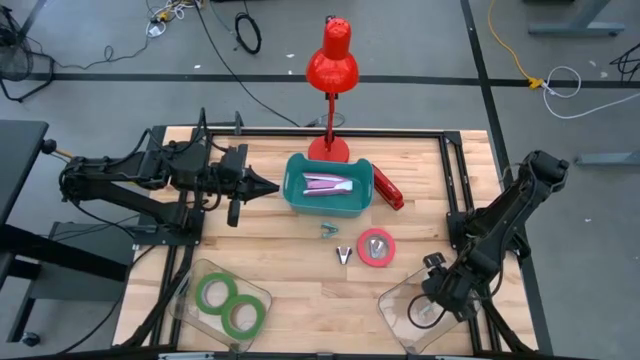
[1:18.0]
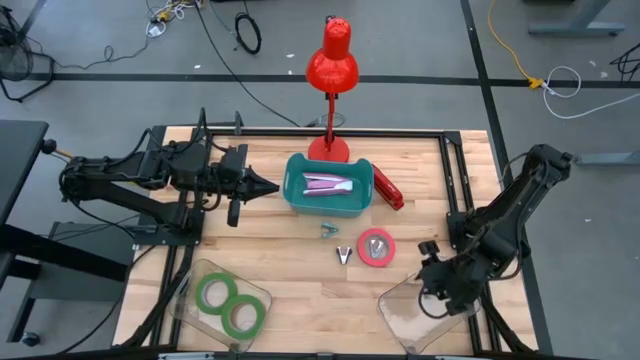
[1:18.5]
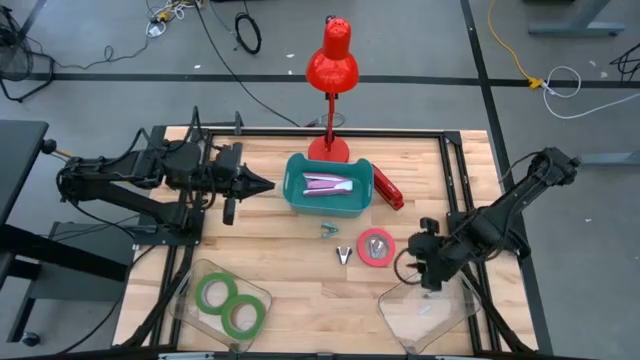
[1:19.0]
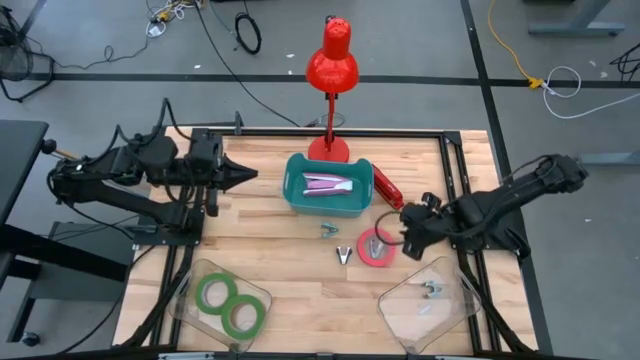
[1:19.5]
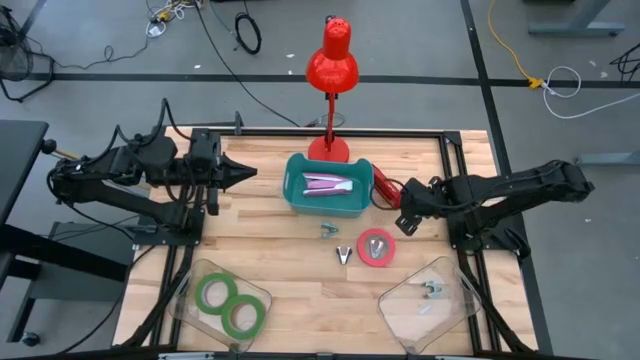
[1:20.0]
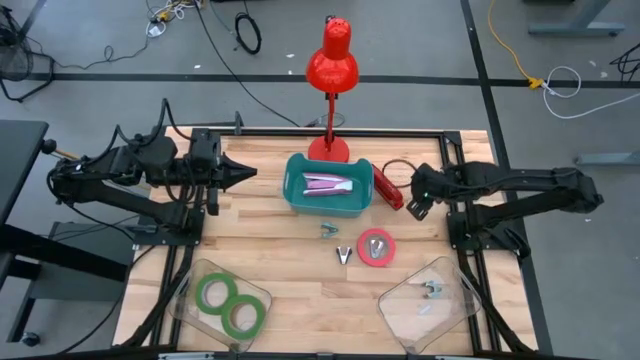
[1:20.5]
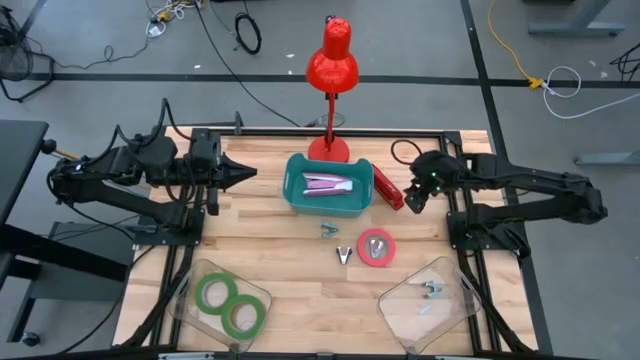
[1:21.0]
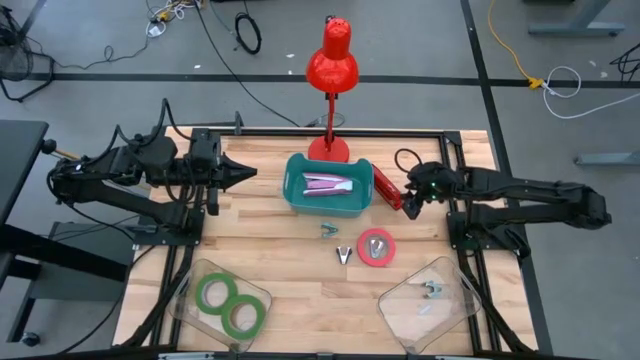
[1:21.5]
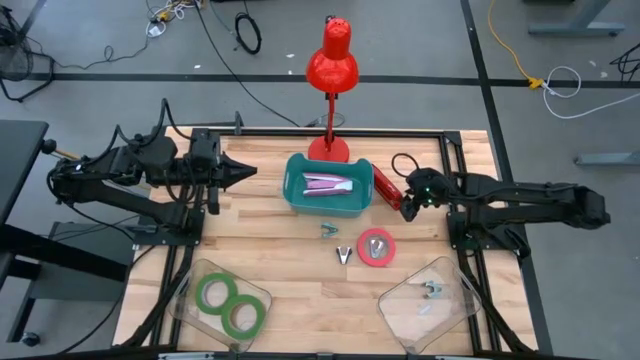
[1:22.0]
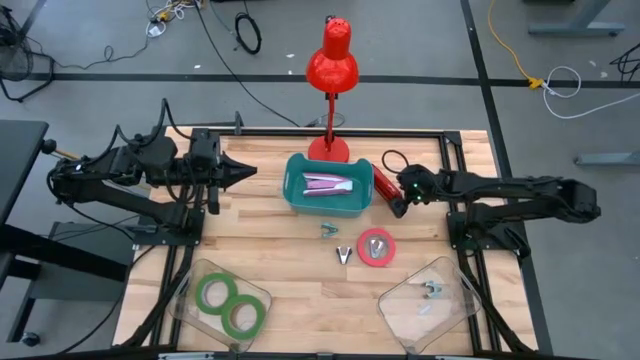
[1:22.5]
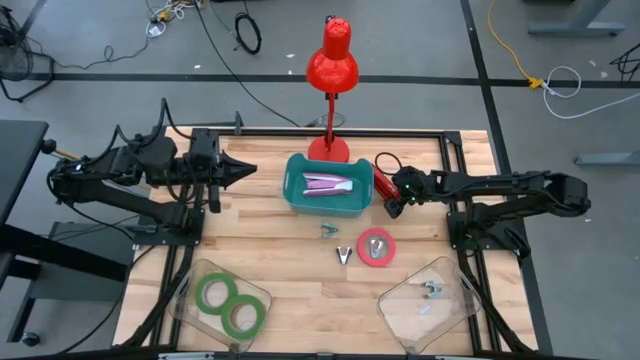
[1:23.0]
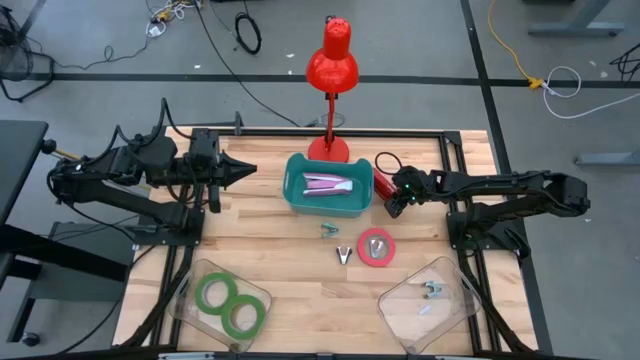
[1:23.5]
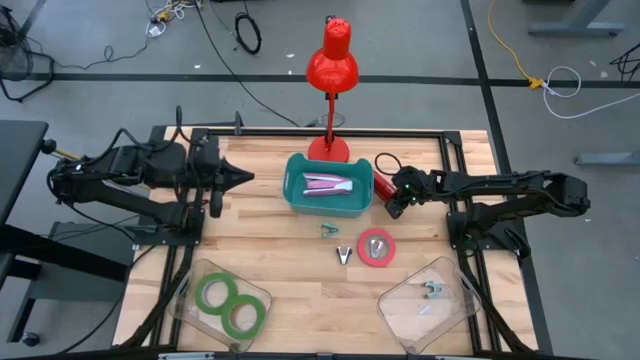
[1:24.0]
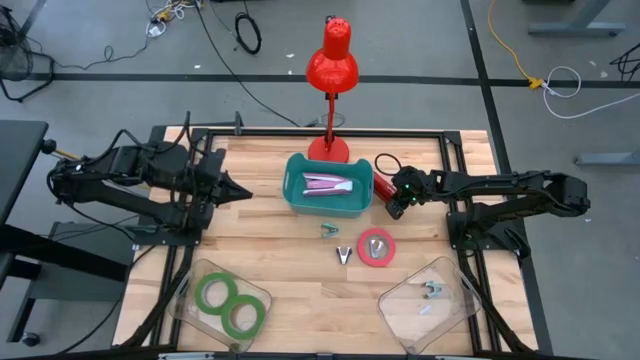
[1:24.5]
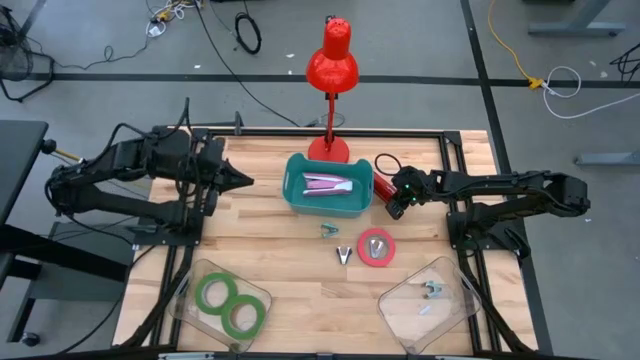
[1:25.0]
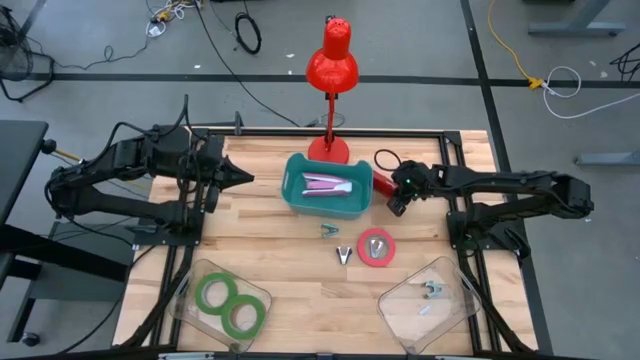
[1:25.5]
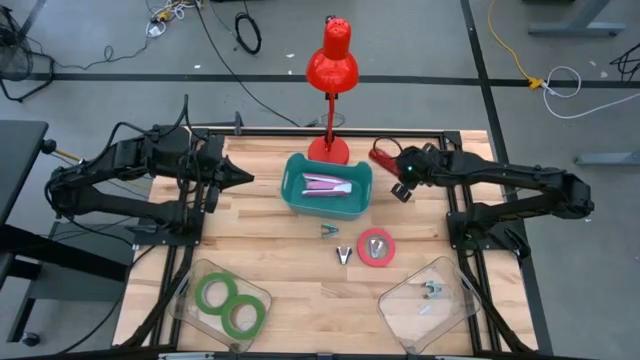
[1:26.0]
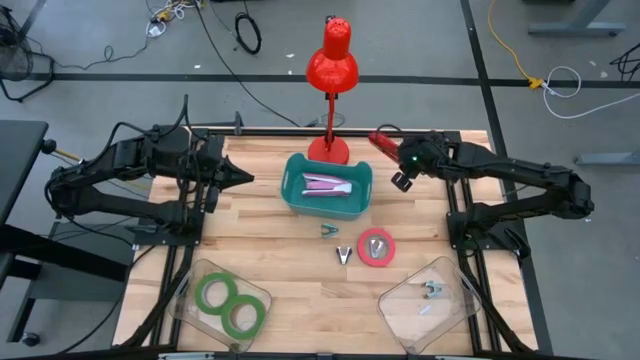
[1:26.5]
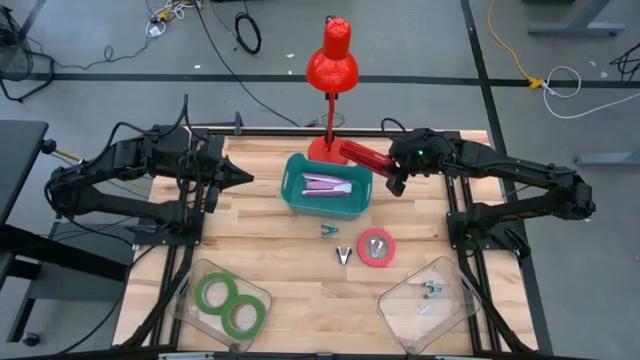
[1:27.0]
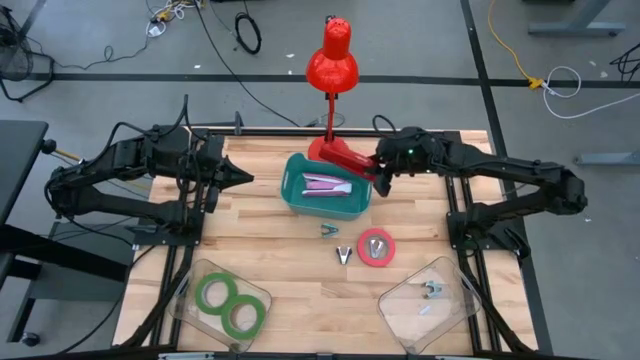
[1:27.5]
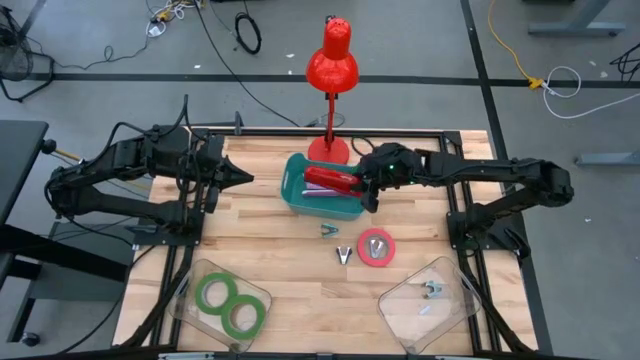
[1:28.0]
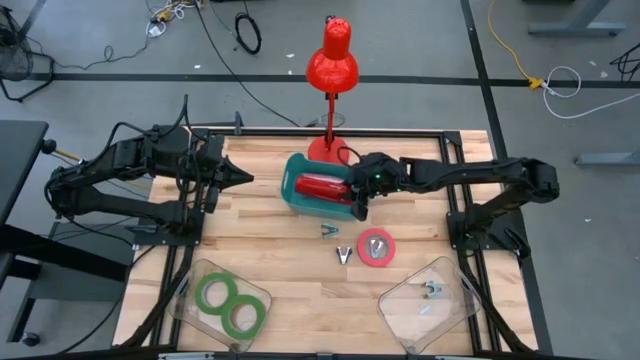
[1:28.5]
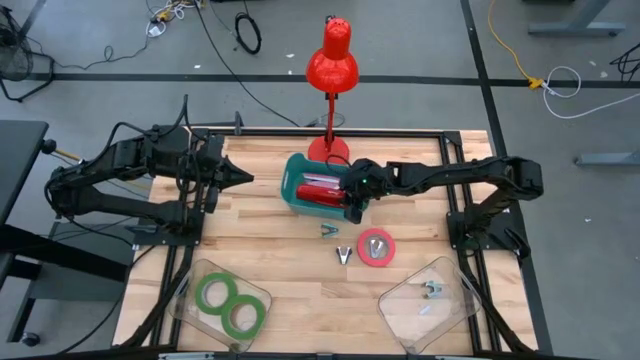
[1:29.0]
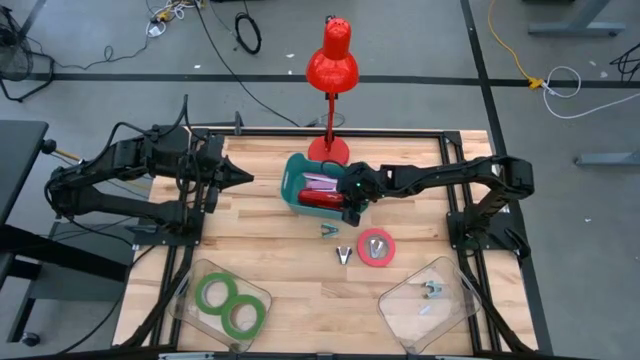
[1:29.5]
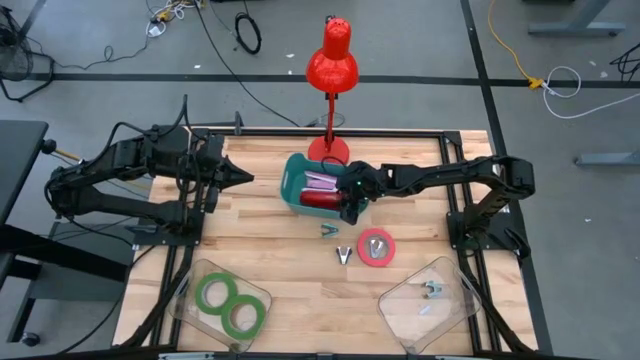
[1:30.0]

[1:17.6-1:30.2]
Task: Pick and place Stapler, Stapler remover, tape
Put the red stapler in the blue bin

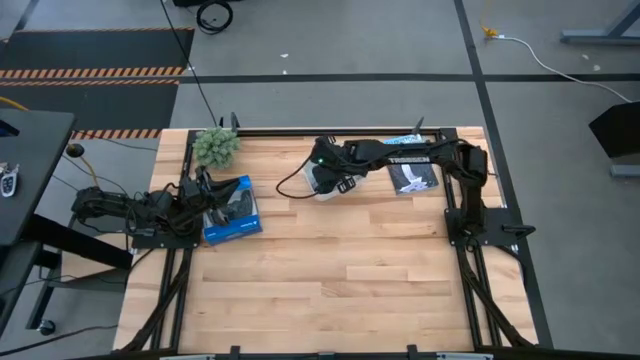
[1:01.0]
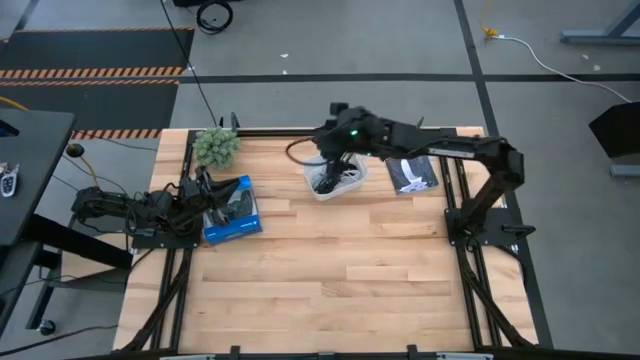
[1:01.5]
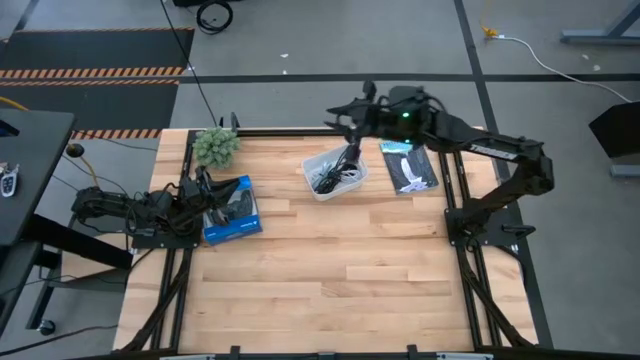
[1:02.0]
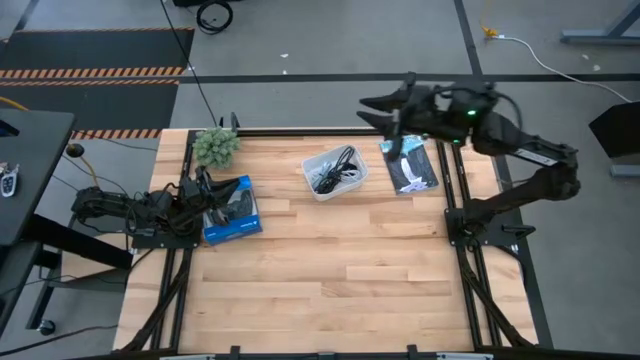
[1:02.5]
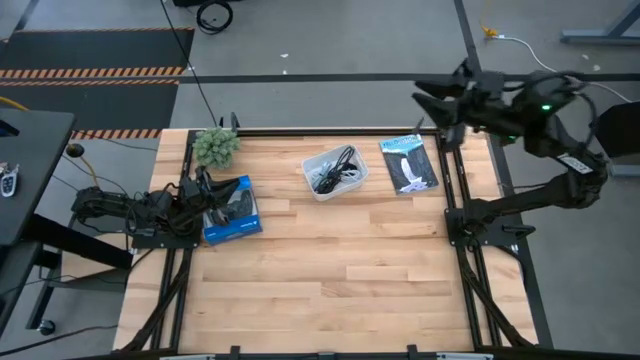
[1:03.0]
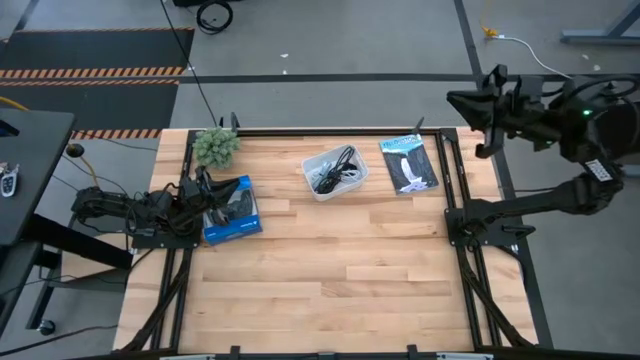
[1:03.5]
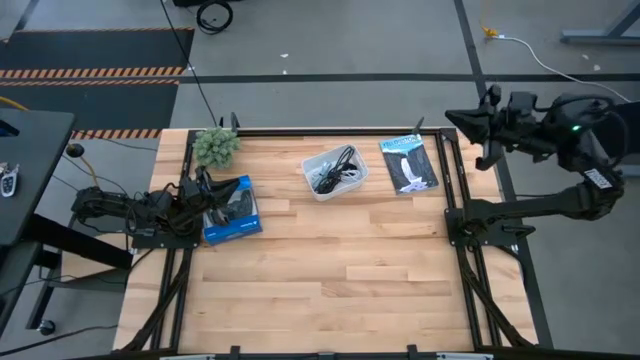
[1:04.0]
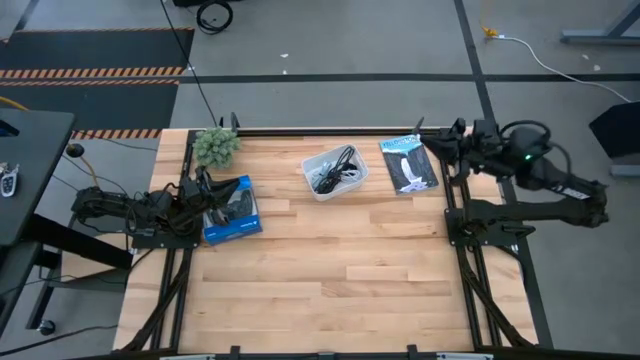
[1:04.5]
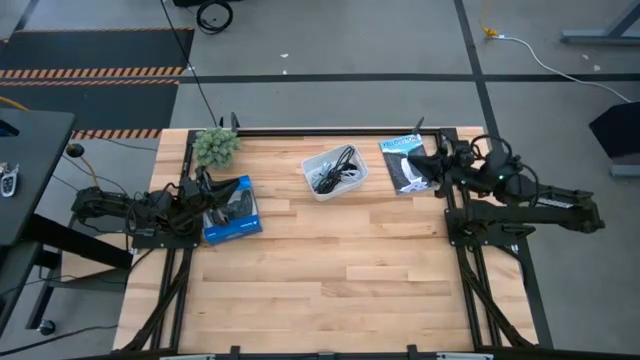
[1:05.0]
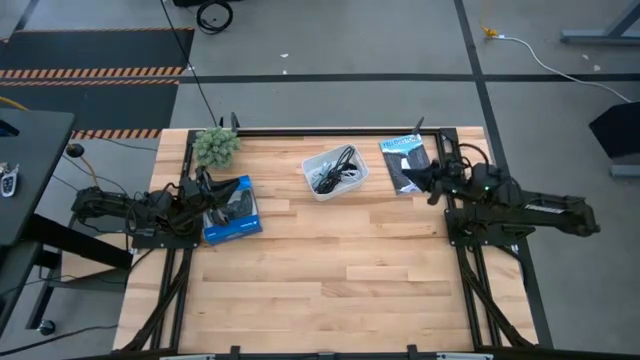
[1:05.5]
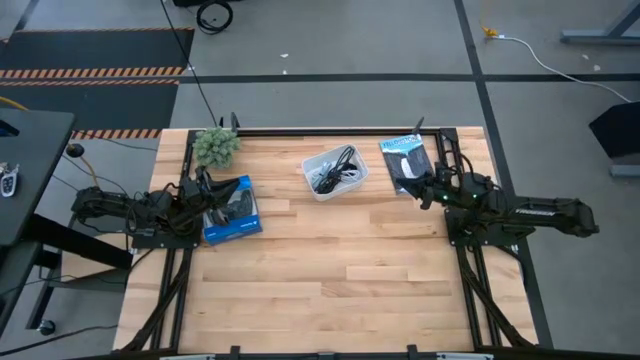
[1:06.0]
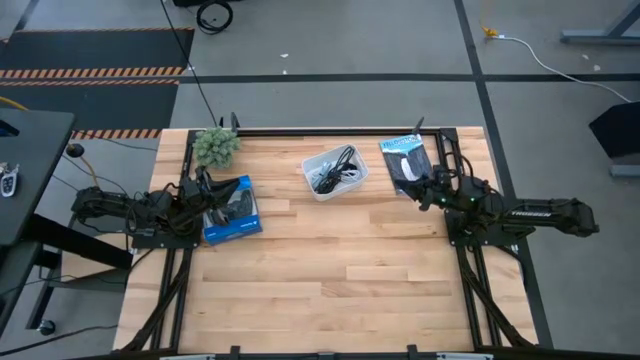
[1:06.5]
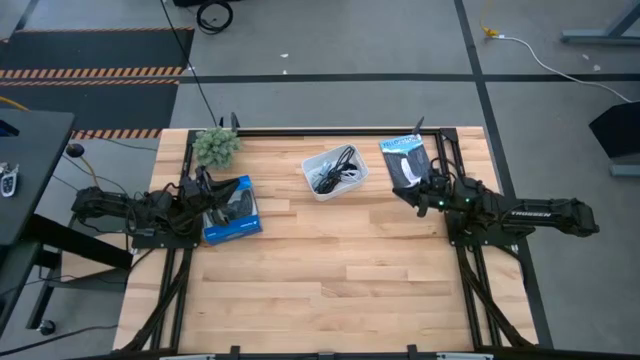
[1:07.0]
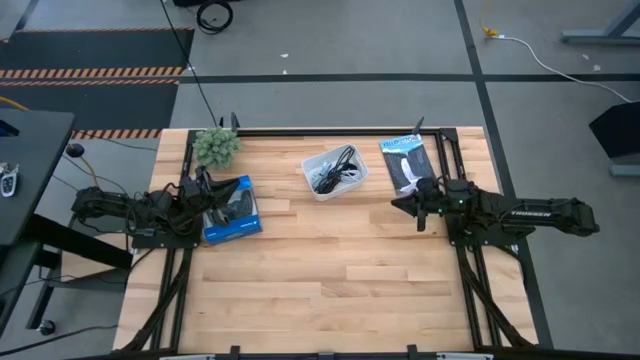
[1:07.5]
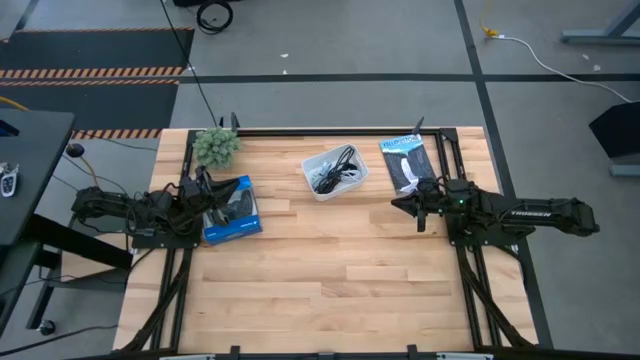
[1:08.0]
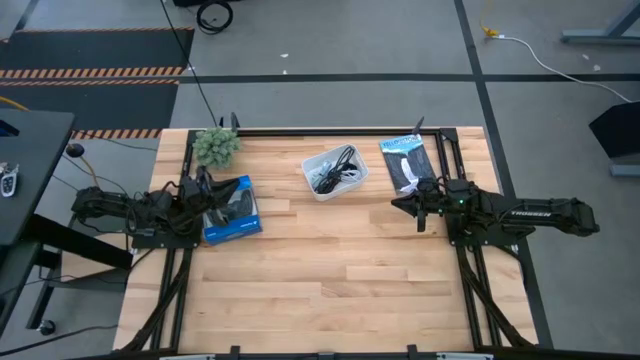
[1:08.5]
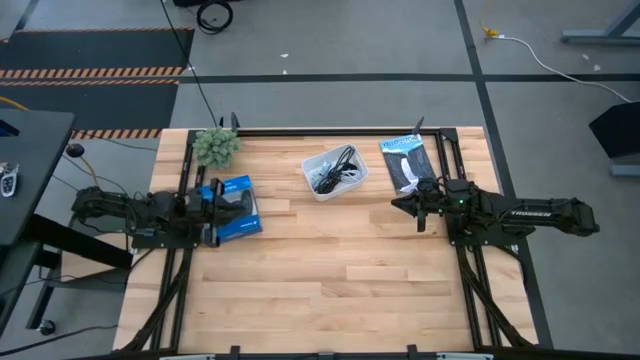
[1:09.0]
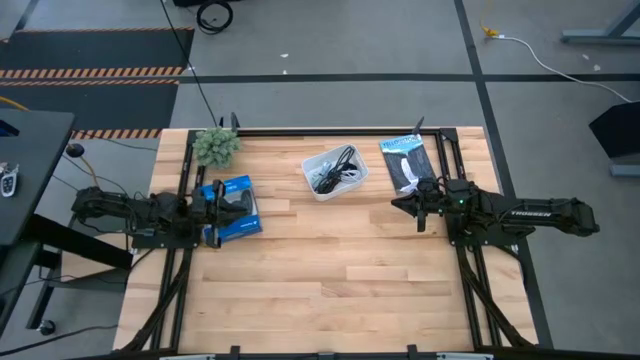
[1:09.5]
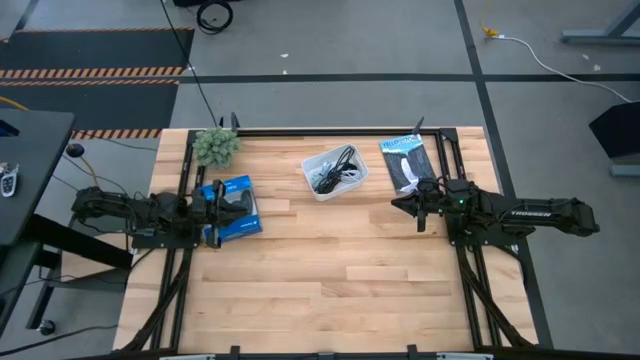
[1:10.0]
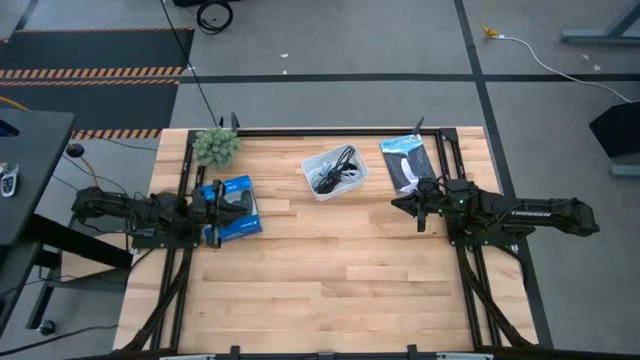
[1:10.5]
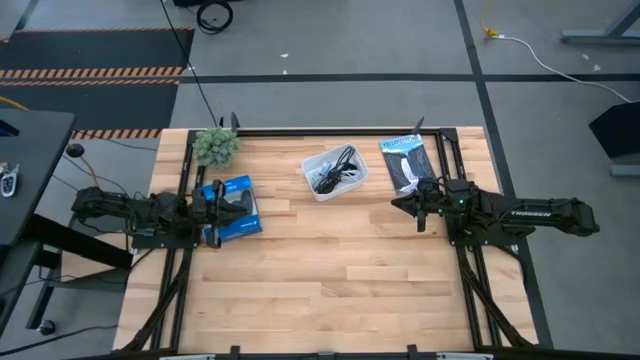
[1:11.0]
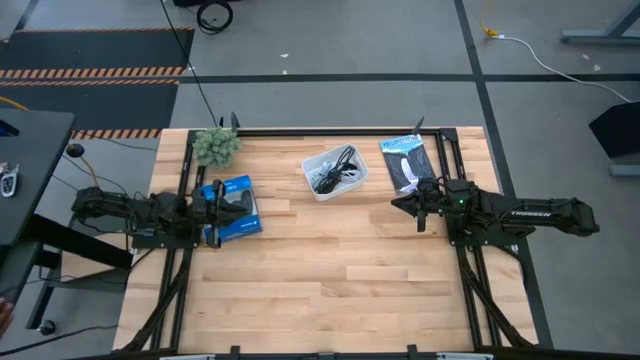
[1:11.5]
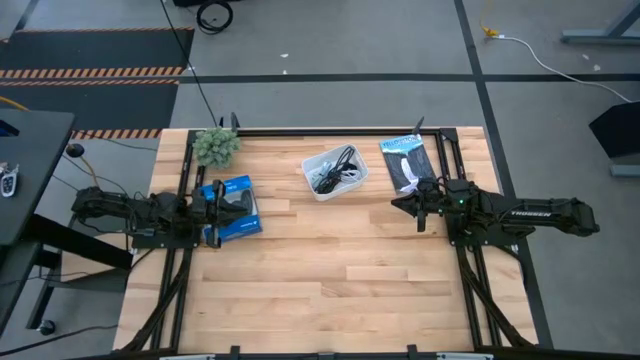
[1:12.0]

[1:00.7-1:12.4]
Task: Pick and place USB-C Cables
Return to Home Position
